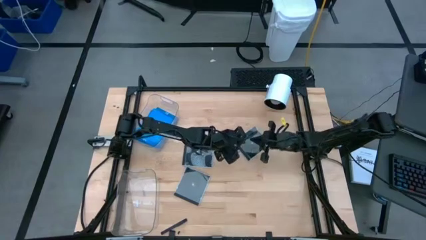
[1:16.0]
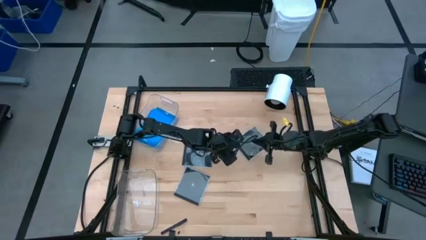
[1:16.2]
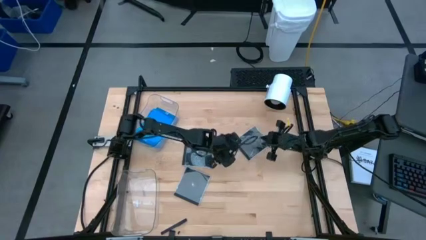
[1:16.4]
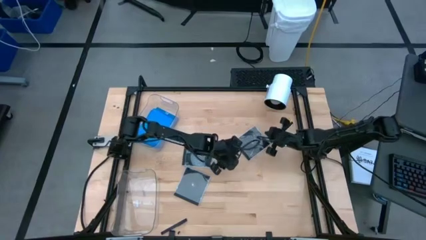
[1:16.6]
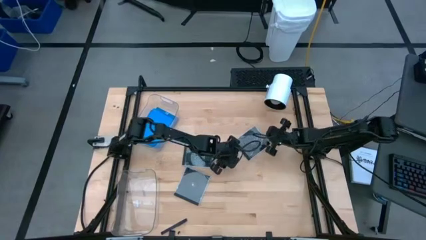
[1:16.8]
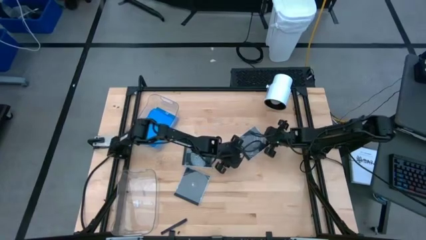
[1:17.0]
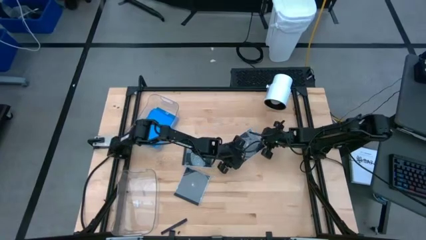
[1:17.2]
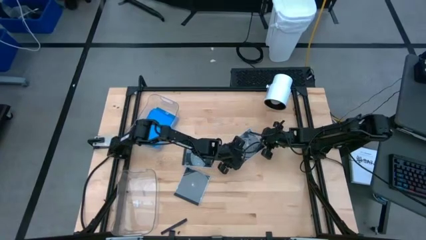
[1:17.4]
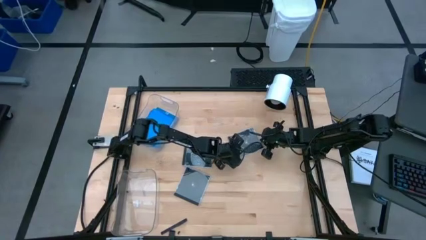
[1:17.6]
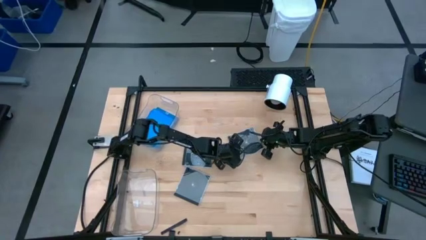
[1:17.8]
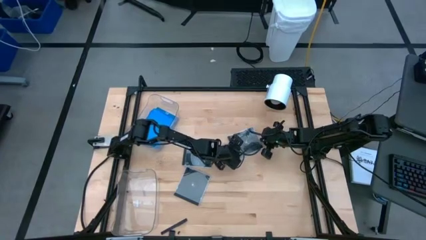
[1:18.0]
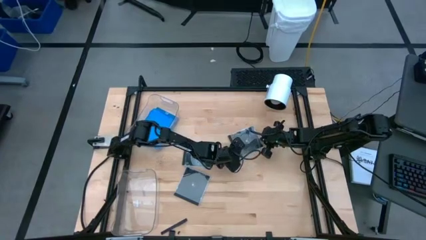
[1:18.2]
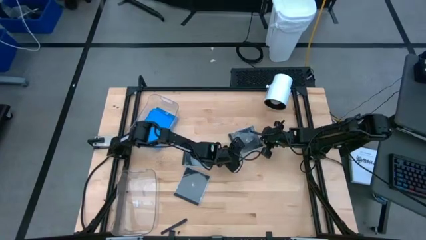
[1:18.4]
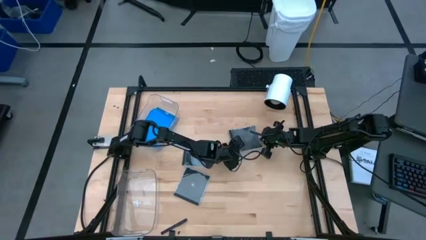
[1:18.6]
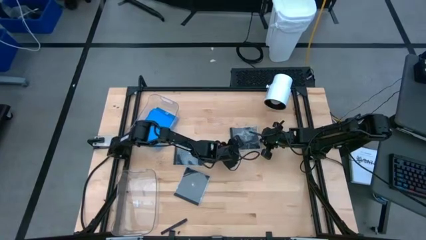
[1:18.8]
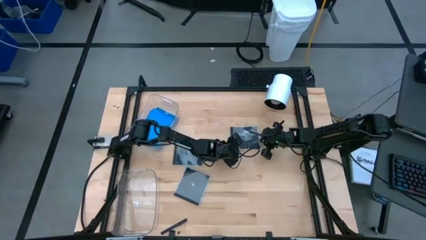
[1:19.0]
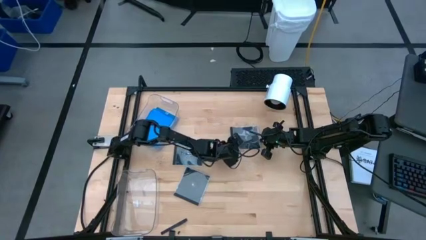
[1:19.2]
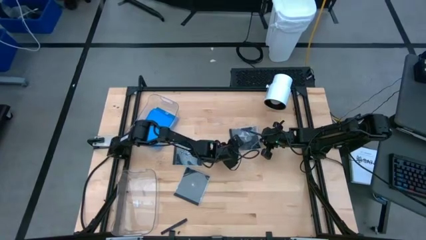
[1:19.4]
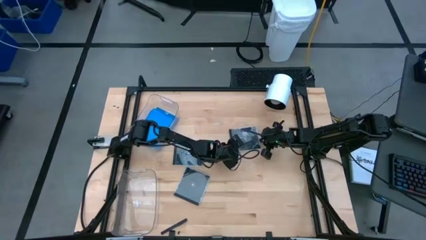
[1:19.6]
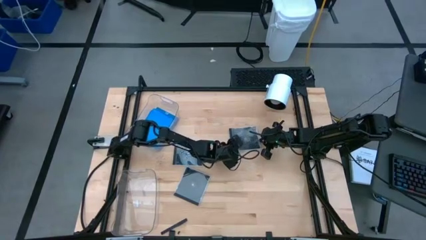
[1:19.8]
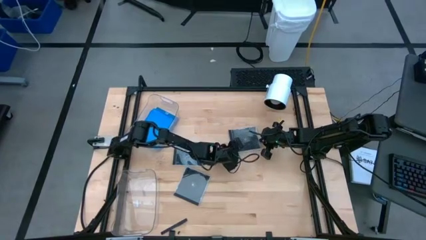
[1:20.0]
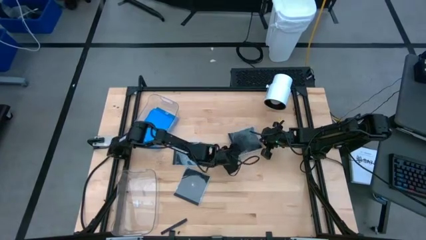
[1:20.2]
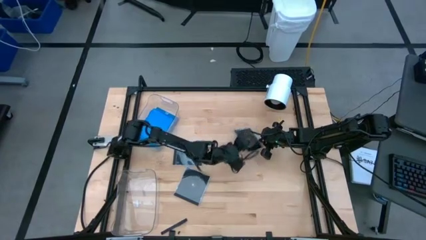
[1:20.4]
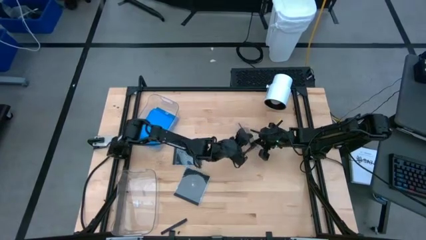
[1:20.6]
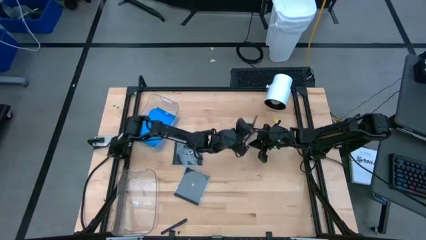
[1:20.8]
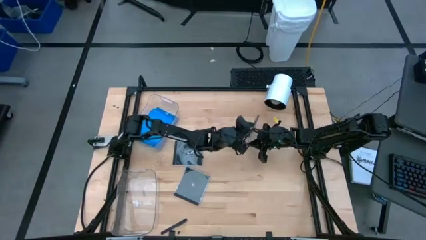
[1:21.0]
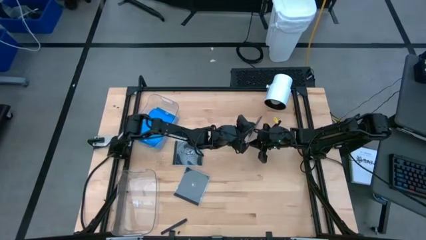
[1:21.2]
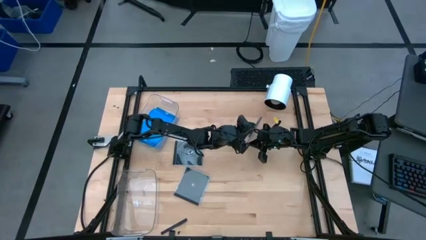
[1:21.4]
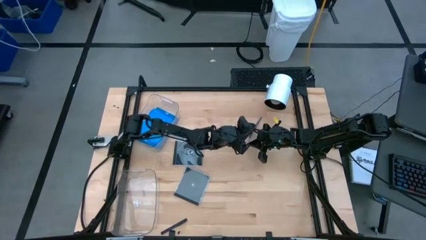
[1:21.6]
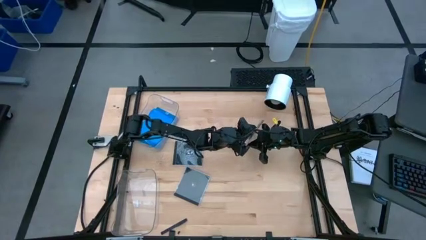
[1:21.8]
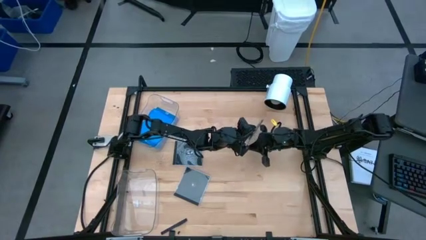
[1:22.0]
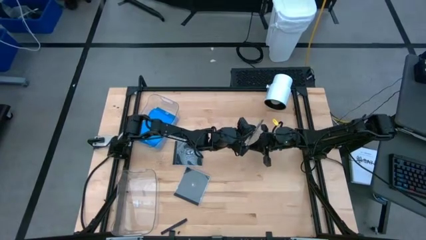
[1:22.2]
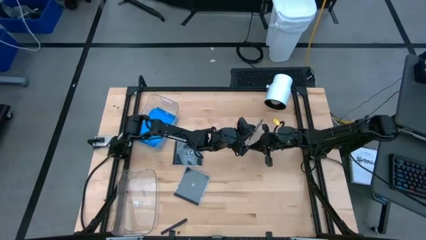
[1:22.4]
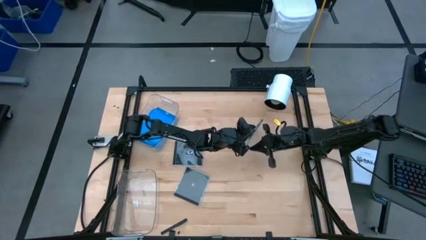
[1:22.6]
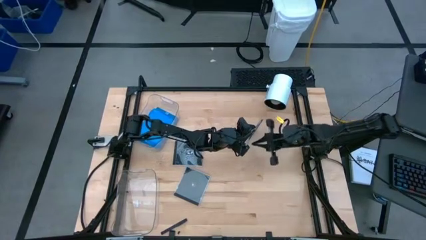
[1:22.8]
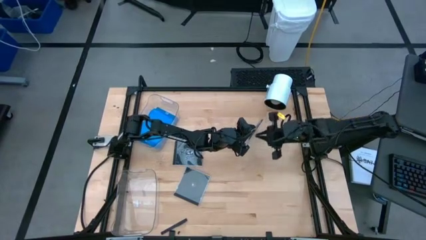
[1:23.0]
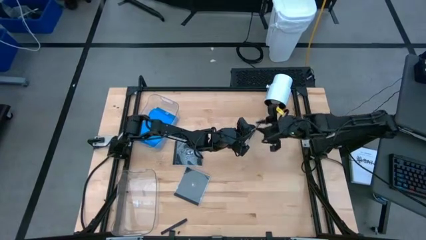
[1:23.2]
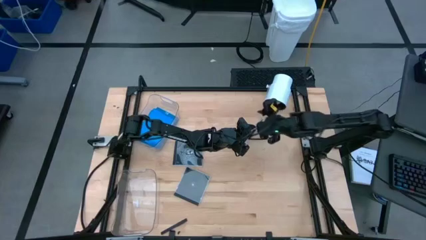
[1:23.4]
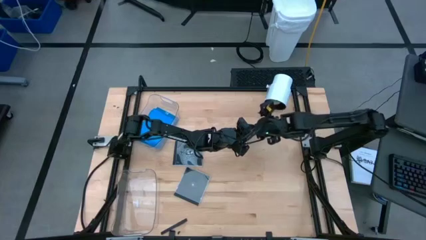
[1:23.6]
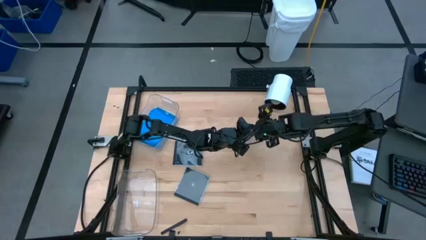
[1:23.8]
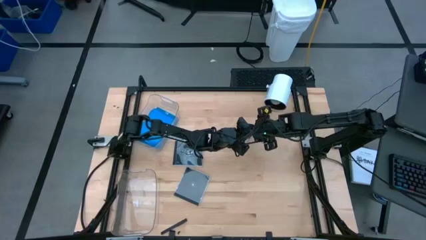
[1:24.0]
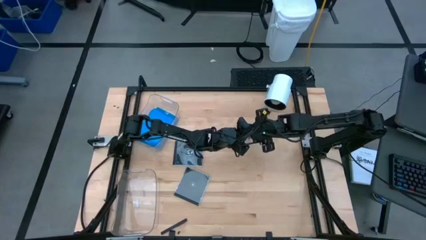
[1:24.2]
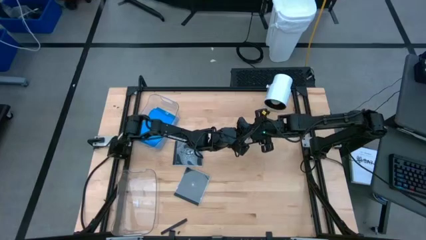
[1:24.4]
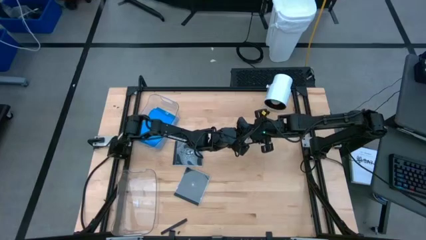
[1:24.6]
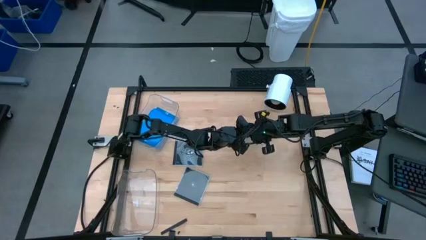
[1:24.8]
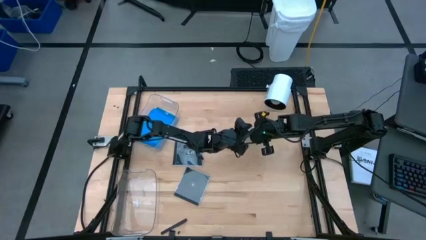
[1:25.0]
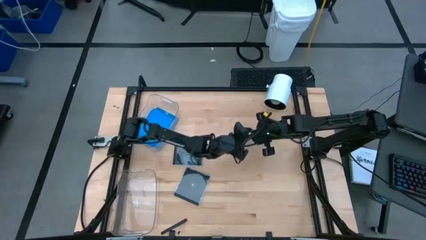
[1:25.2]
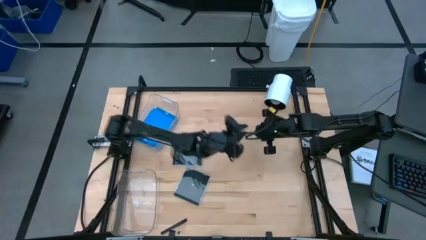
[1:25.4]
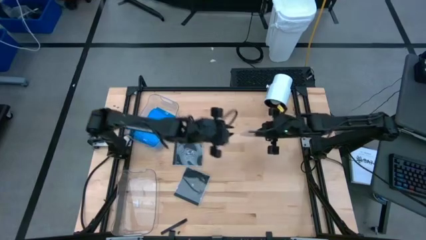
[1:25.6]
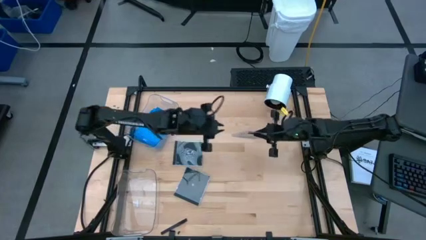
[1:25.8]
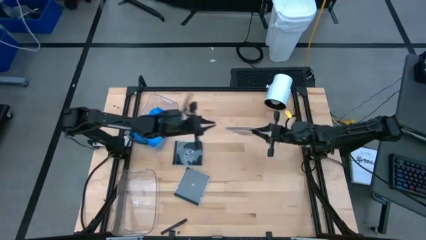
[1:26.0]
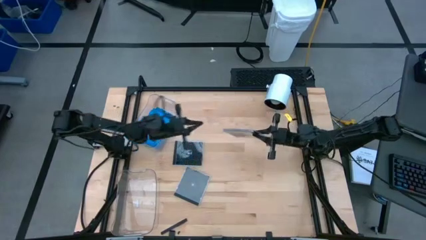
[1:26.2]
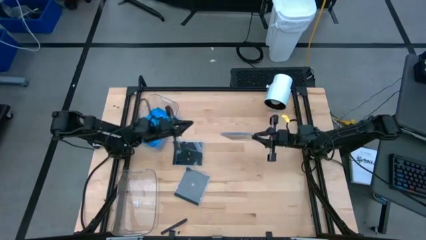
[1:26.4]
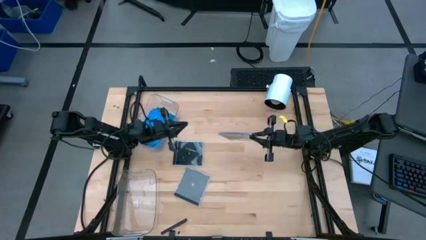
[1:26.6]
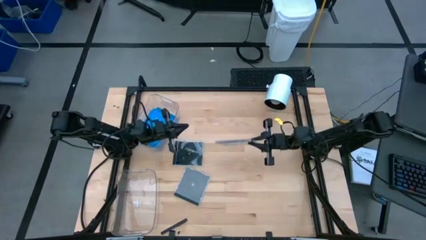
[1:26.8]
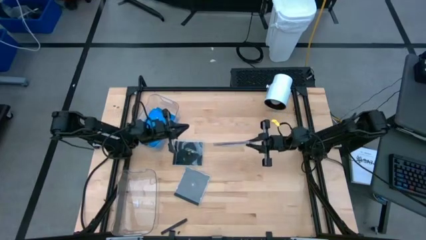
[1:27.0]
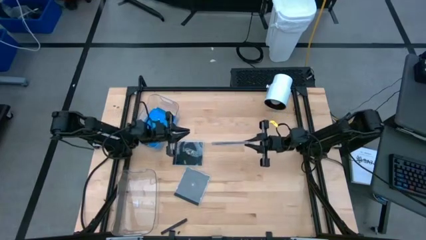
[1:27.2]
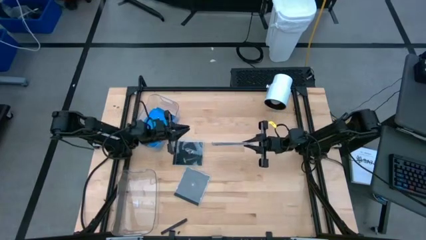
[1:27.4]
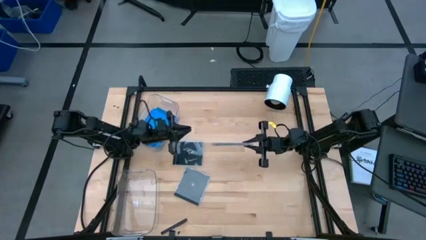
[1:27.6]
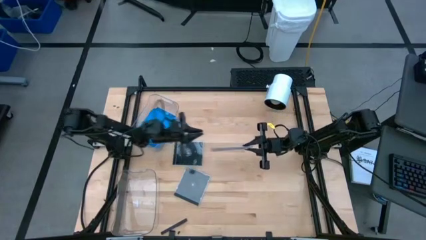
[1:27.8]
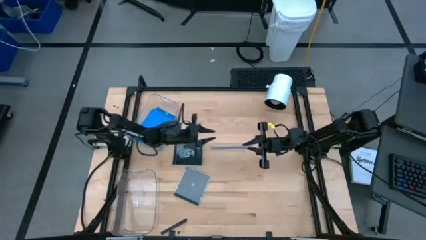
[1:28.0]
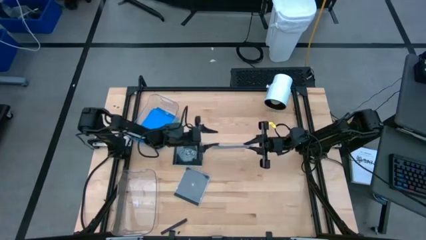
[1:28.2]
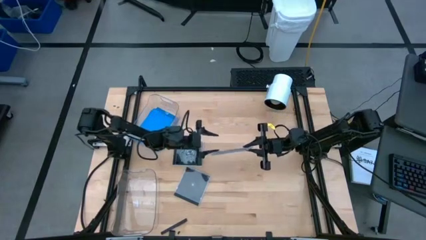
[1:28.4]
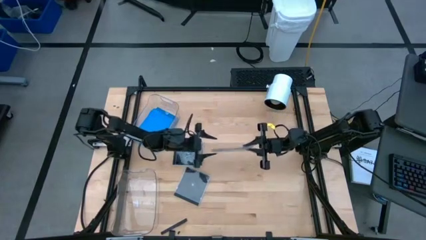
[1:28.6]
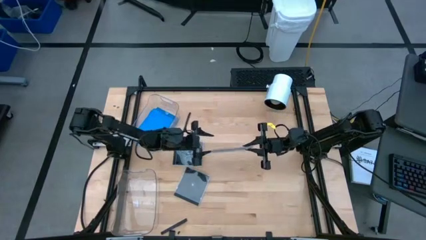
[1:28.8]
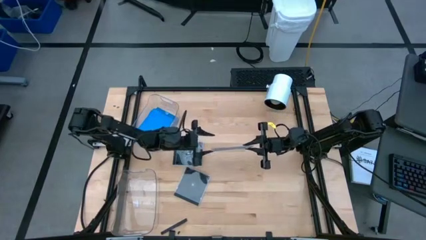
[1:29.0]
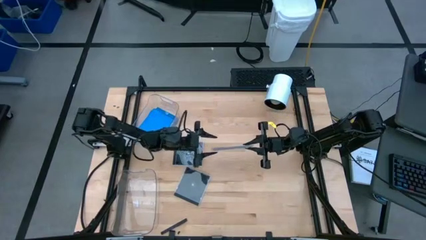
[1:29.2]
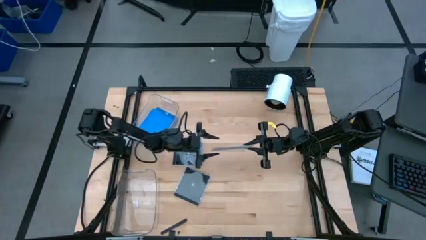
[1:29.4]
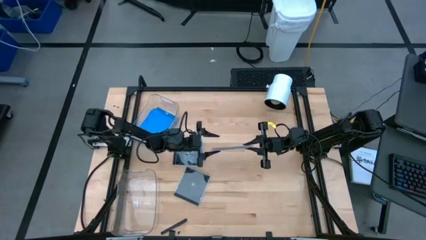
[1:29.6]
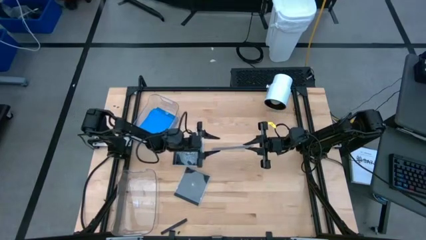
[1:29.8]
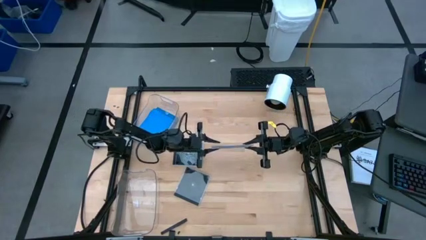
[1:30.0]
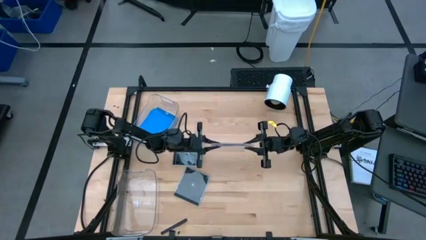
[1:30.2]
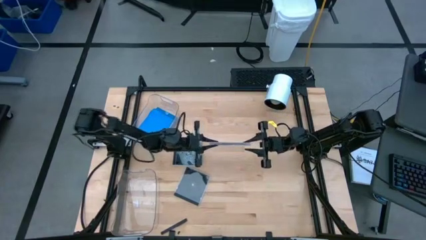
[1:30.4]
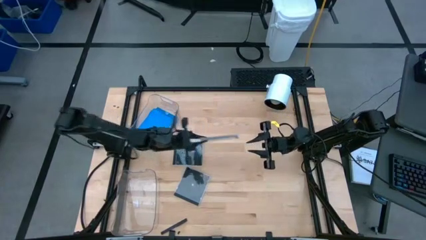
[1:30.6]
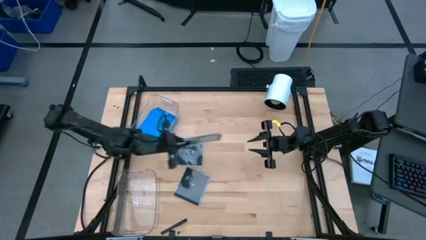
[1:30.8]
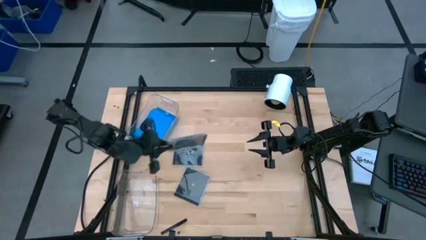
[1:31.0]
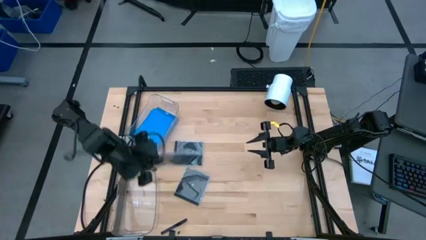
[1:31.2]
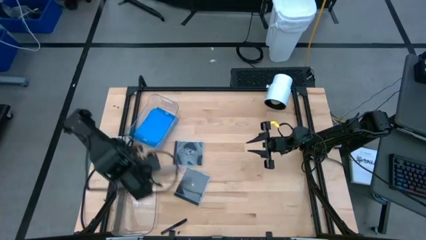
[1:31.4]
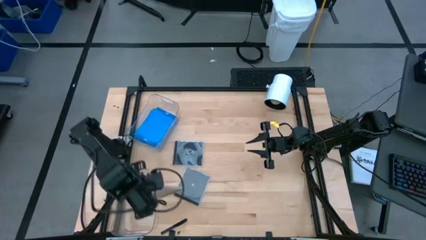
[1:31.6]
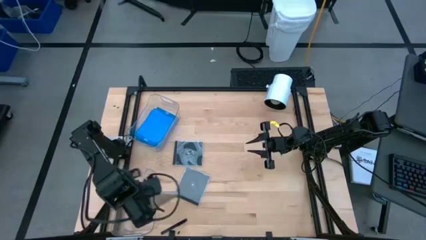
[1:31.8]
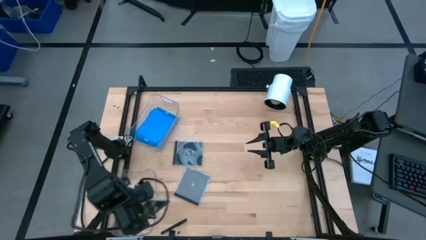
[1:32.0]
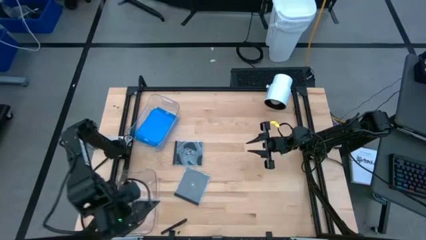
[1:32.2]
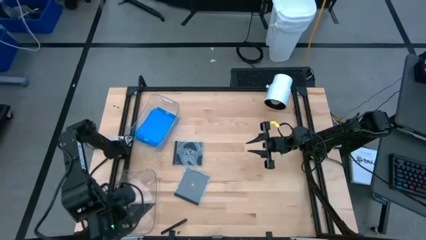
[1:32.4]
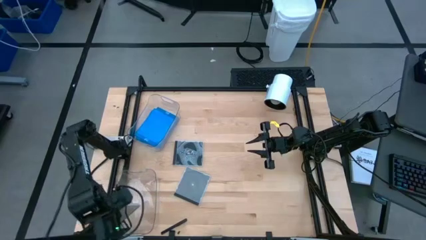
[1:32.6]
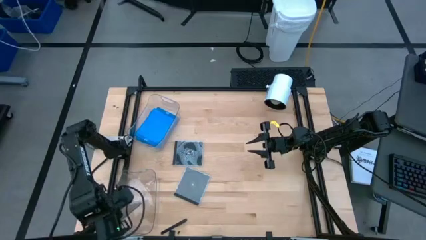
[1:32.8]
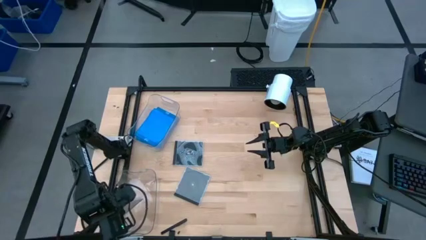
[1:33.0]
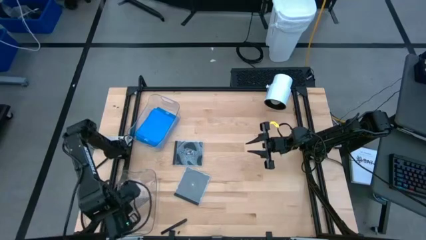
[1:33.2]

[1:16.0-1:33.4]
Task: Pick & place jewel cases by type
Put the top black CD case into the bottom transparent bin
